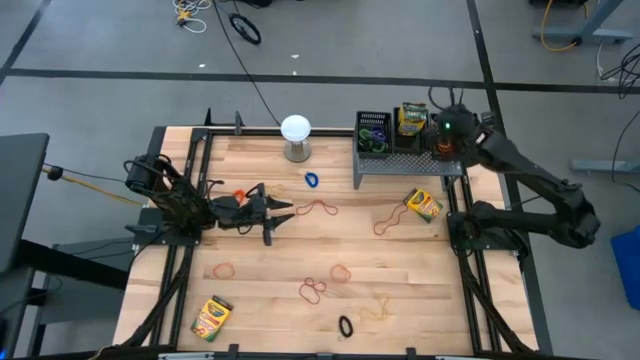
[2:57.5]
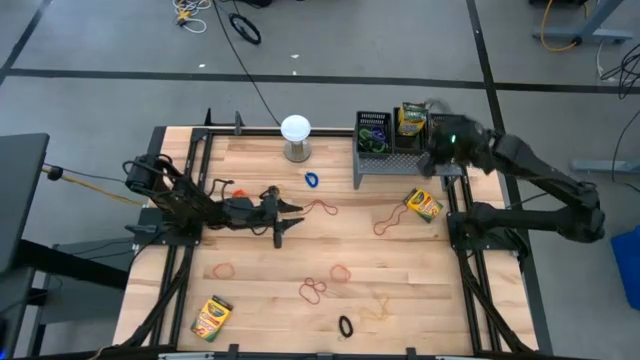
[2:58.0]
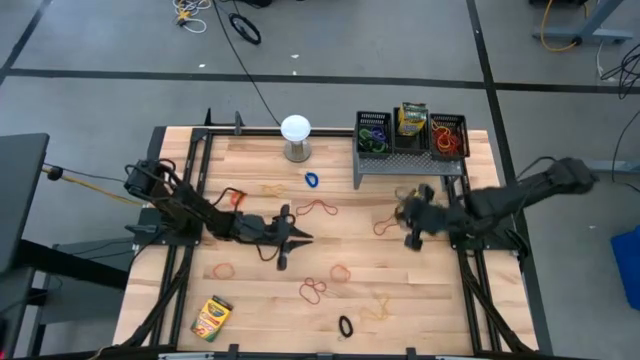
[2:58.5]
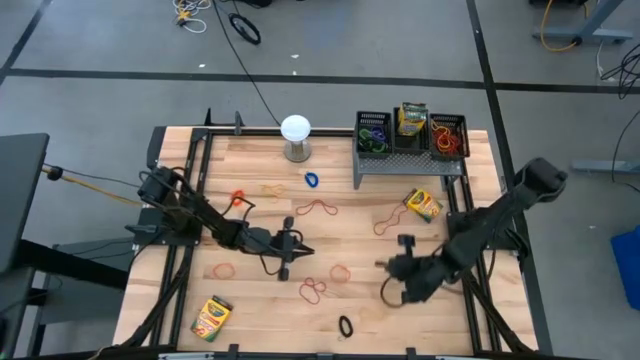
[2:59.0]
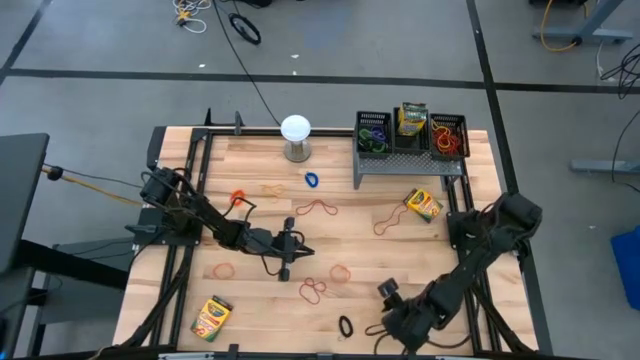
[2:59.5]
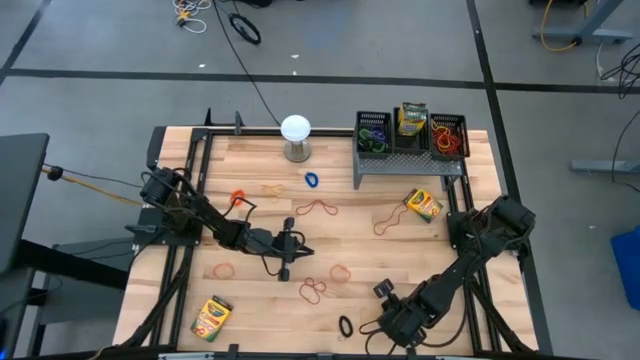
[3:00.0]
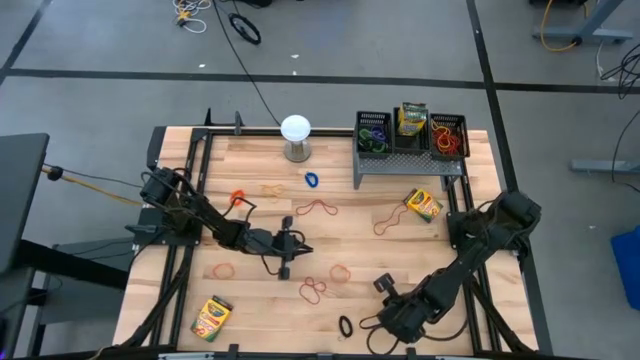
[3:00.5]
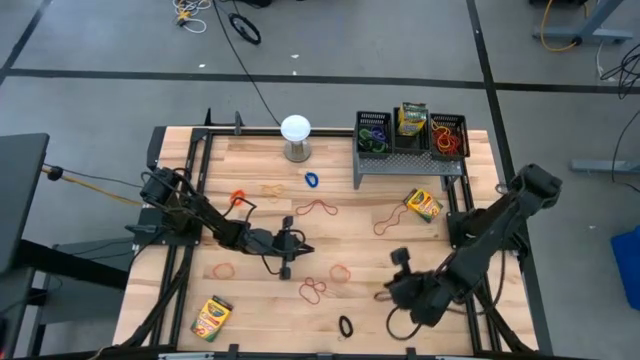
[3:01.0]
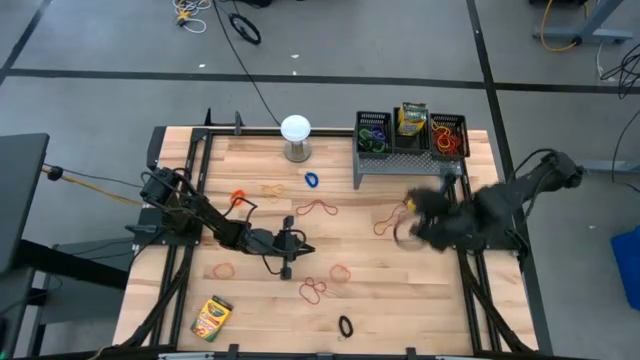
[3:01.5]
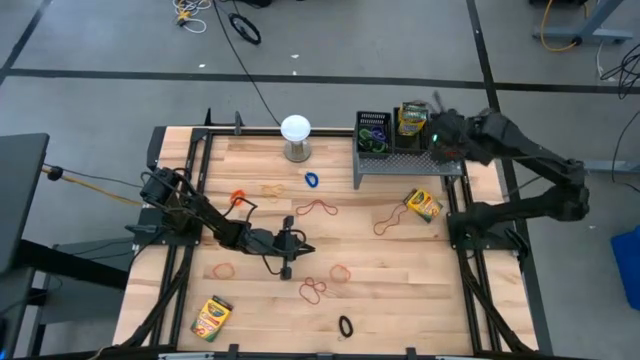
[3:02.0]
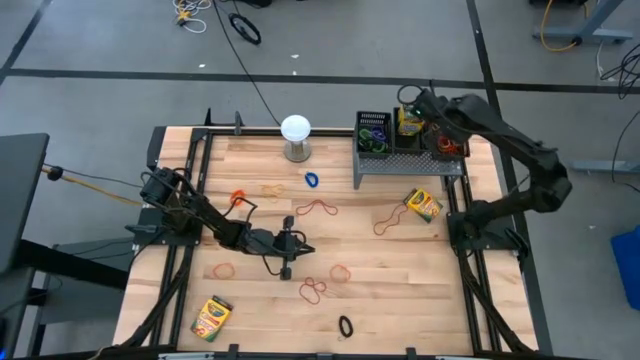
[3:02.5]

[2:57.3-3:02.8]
Task: Pick & Place Office Desk Supplies
Put the yellow rubberband into the right black basket on the shelf

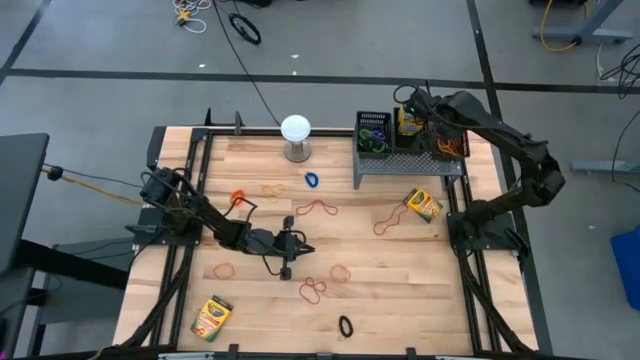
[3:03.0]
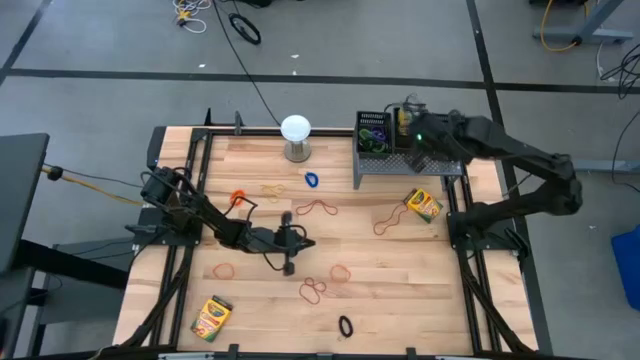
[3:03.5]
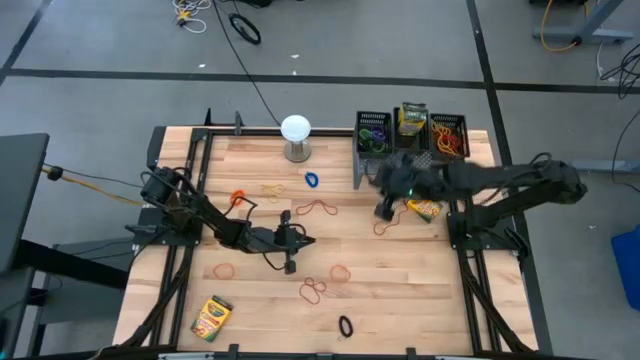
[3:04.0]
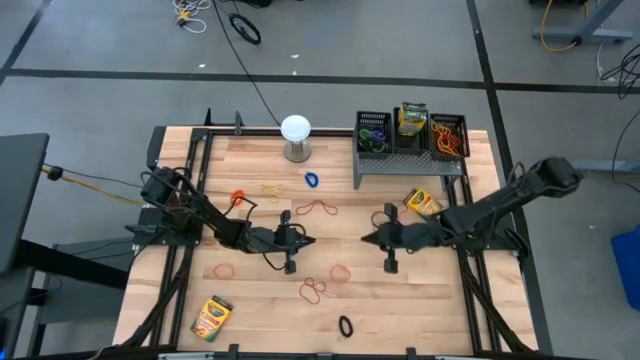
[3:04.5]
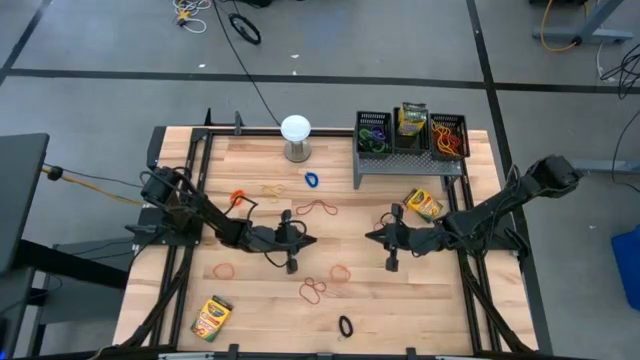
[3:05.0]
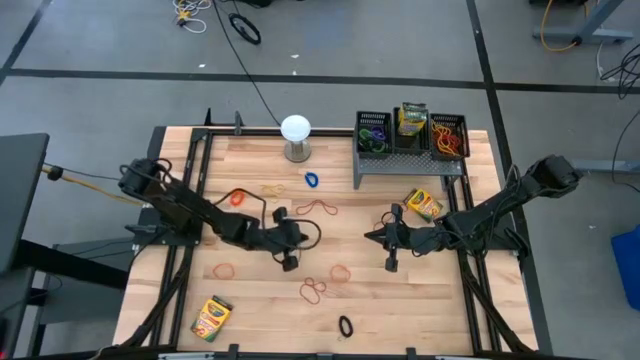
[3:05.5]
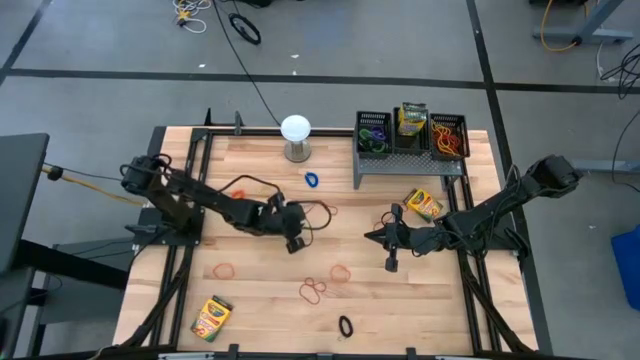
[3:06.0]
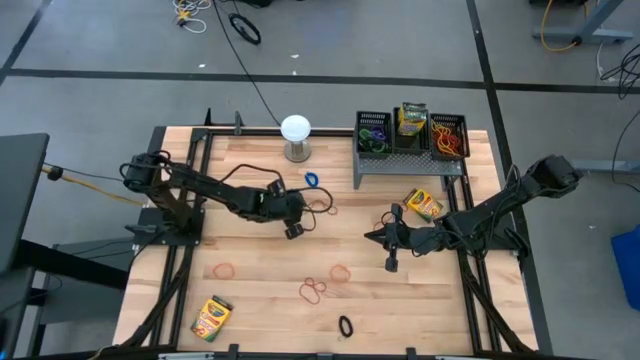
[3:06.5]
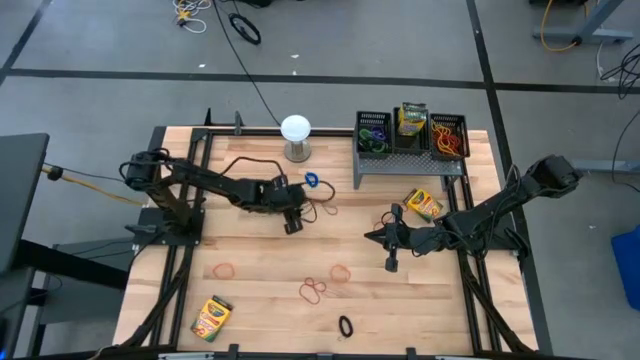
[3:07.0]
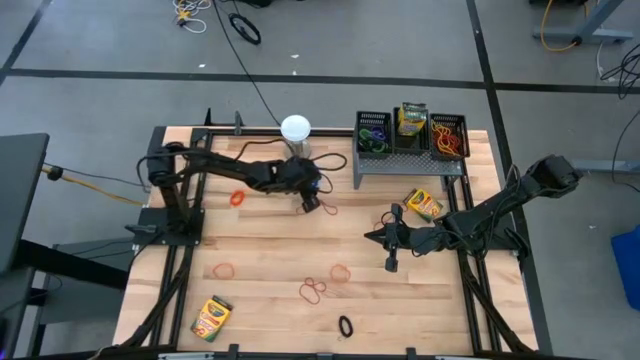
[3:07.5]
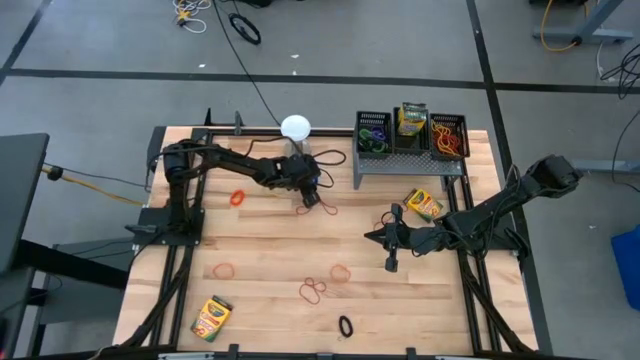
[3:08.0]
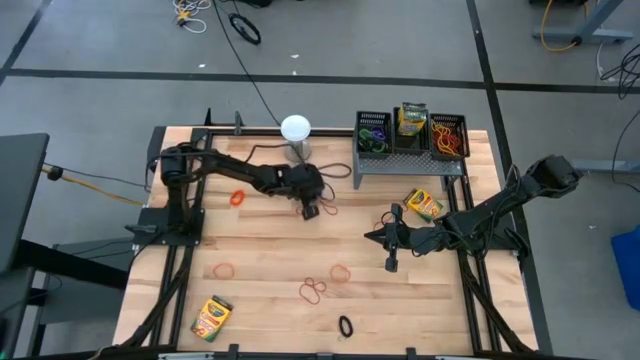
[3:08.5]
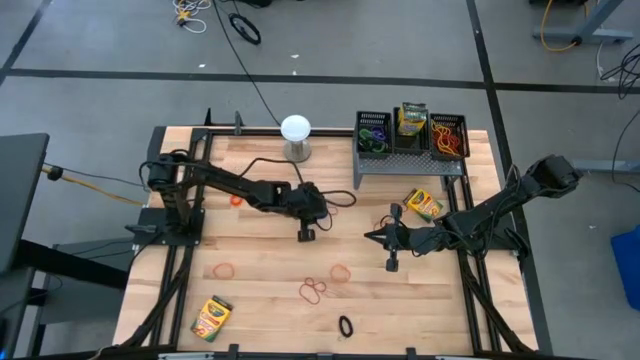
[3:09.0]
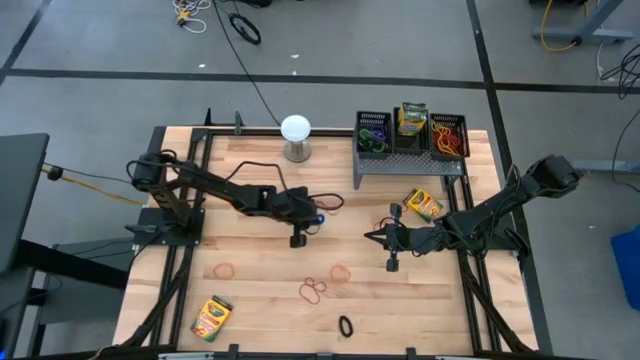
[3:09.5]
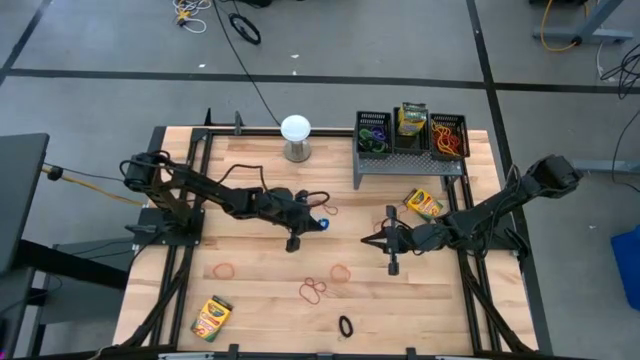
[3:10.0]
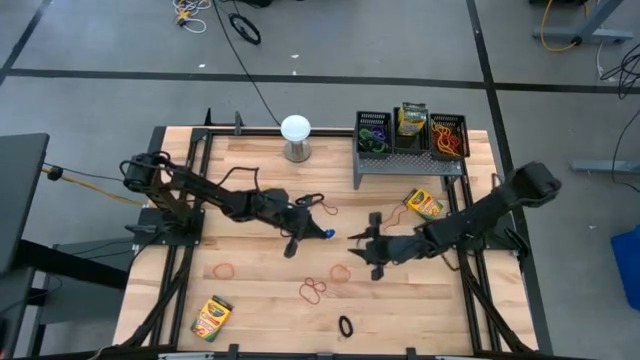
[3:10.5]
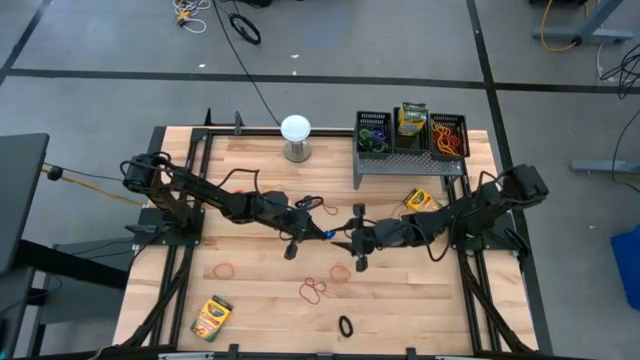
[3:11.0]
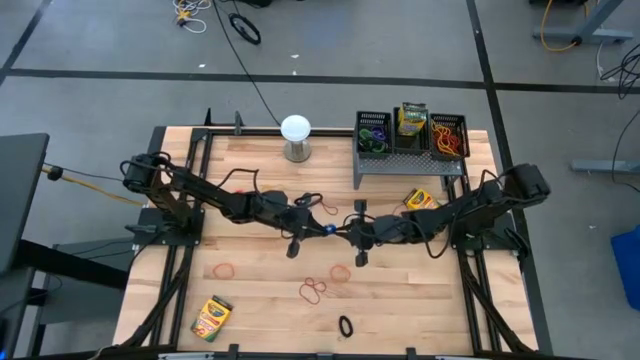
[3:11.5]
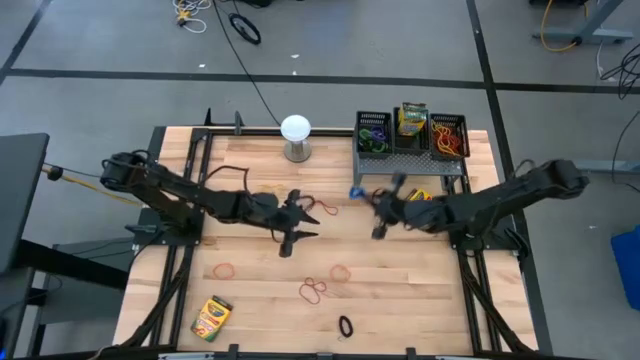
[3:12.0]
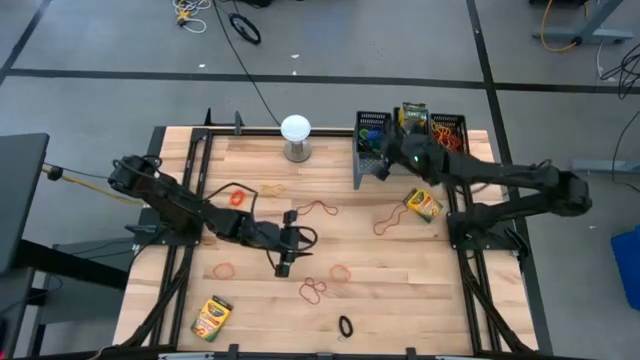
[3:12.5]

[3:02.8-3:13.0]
Put the blue spring keychain into the left black basket on the shelf

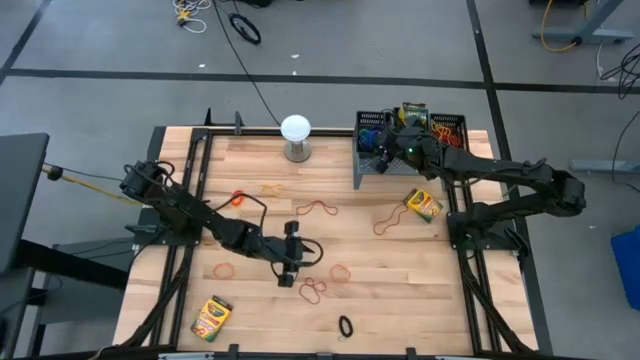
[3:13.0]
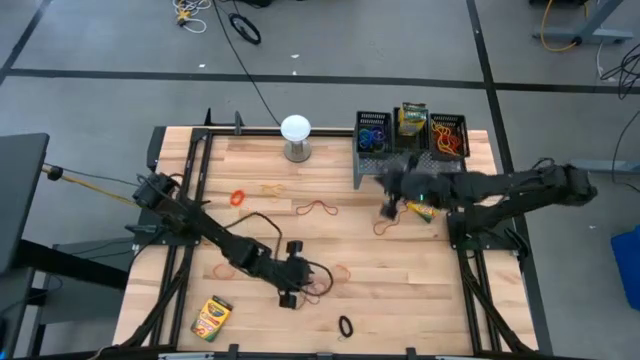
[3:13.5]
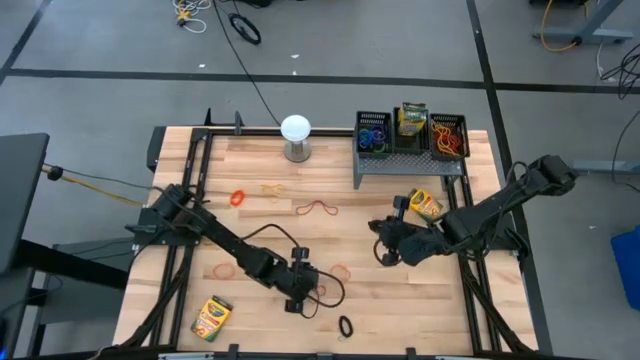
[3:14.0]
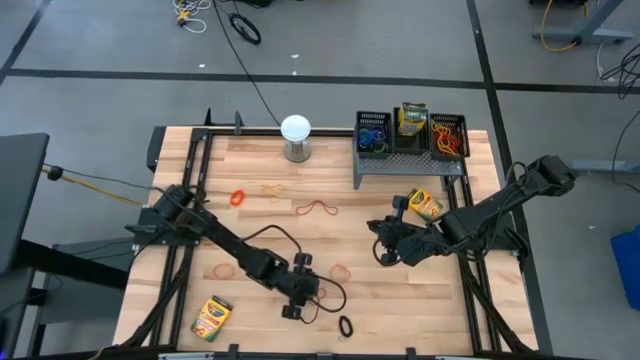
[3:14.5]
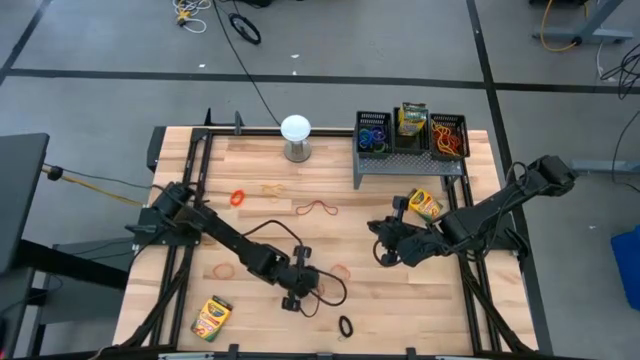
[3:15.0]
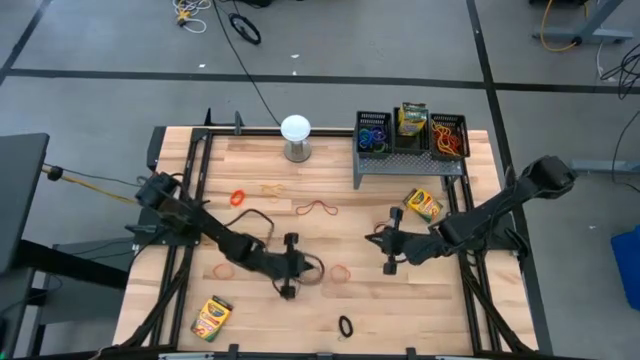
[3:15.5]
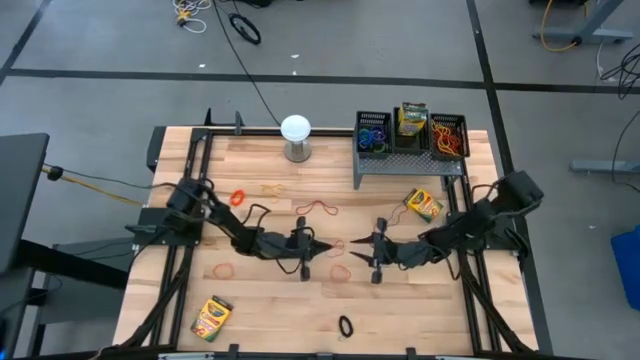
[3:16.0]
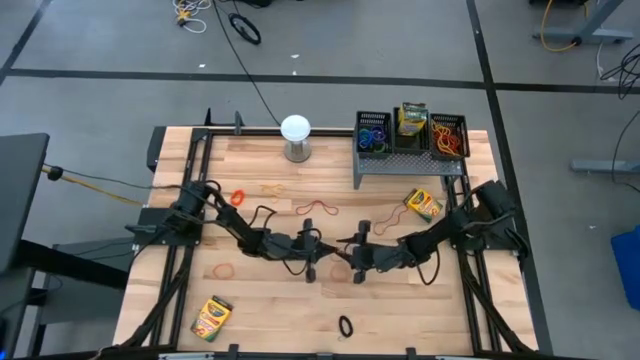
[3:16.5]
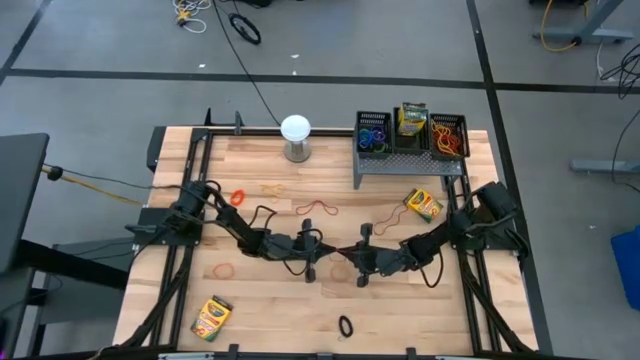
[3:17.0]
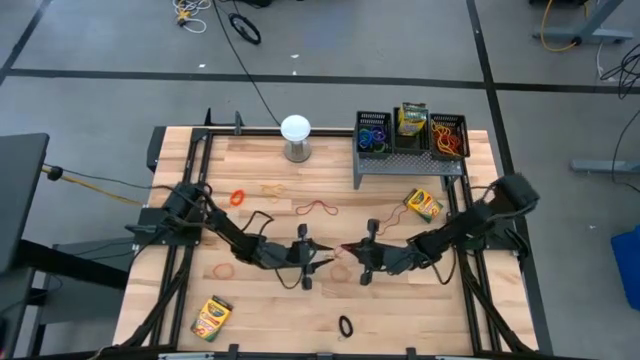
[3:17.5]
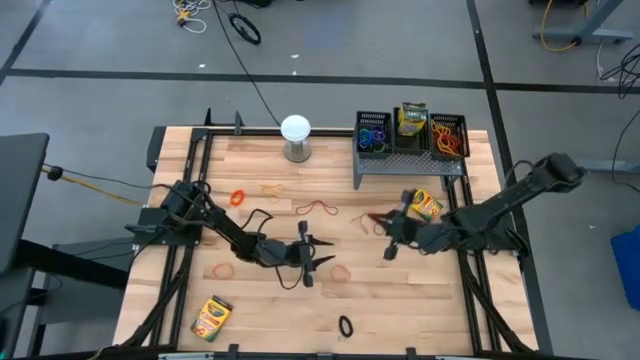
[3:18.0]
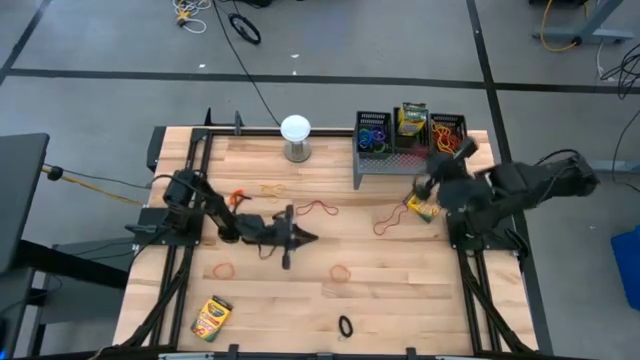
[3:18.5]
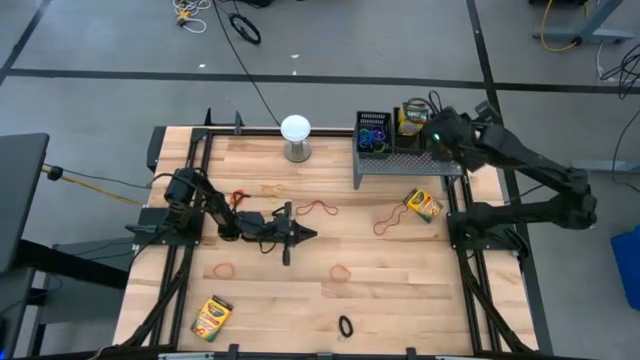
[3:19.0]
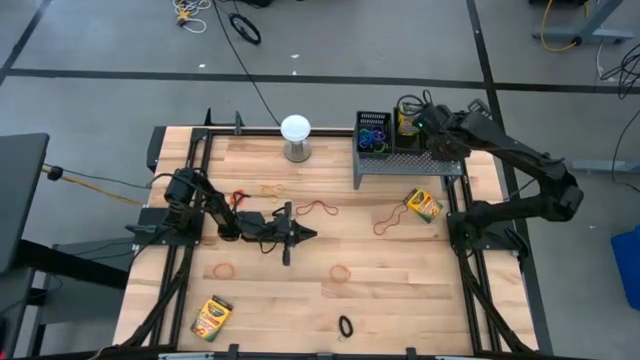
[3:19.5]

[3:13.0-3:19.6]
Put the red rubberband into the right black basket on the shelf
